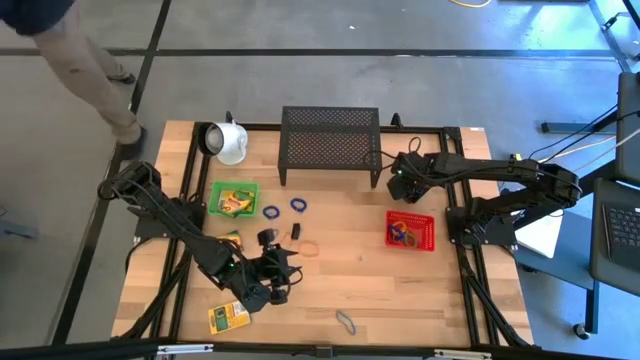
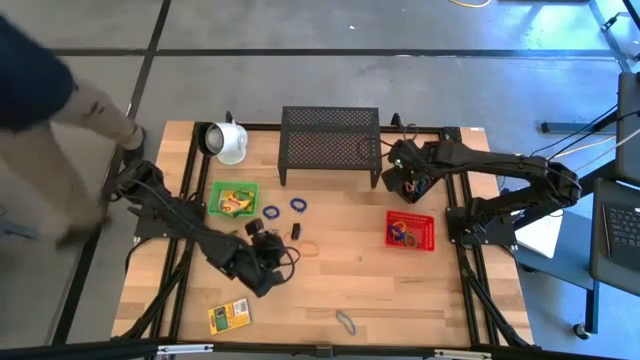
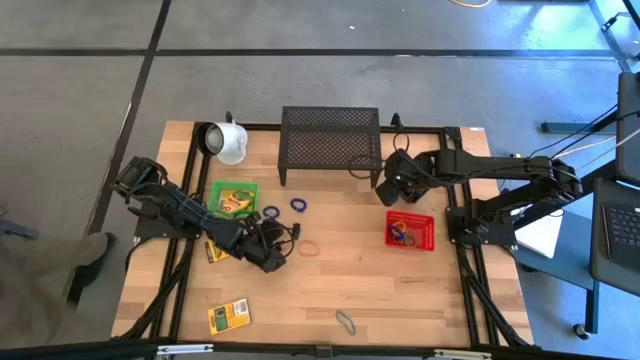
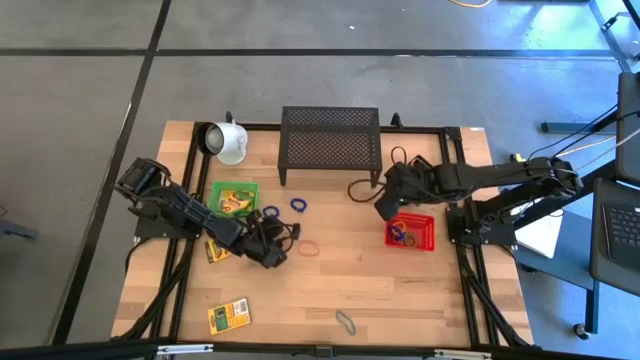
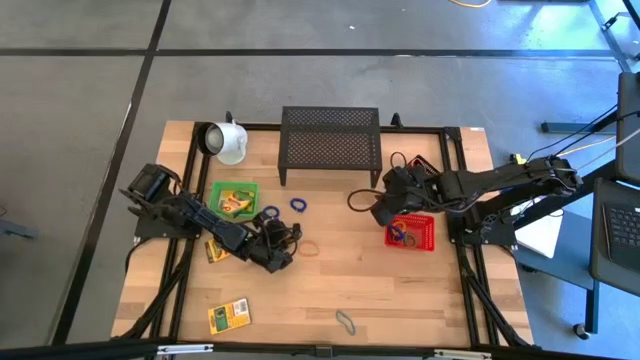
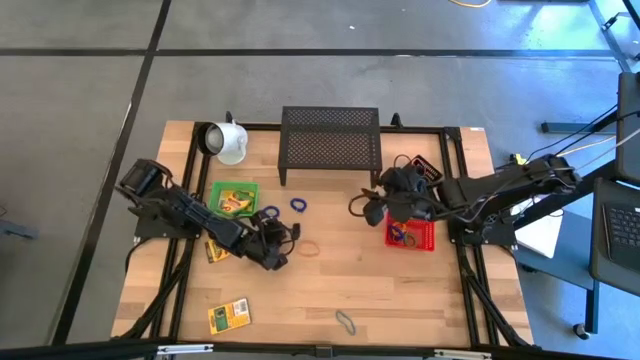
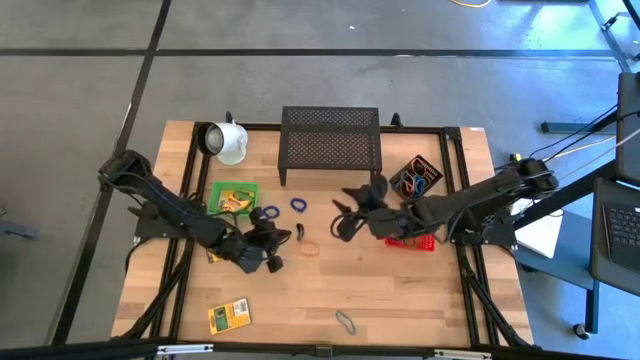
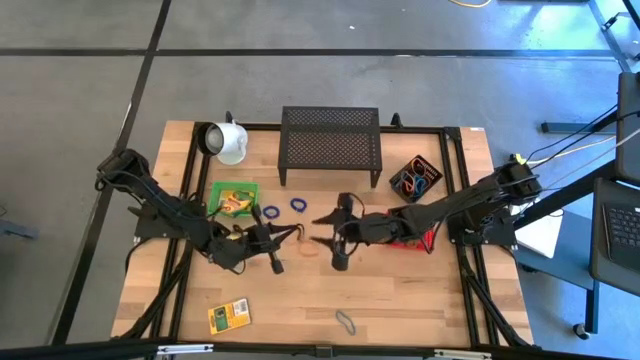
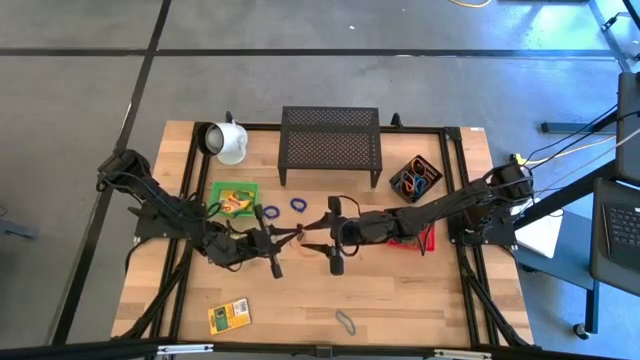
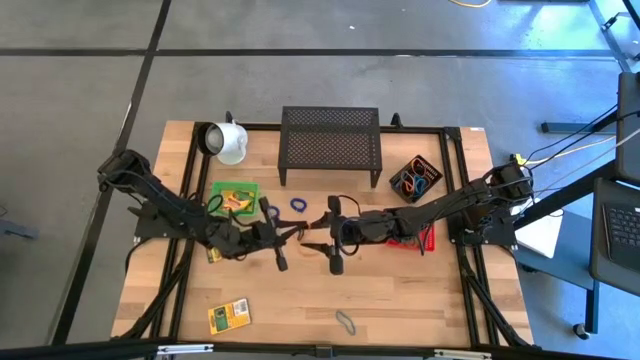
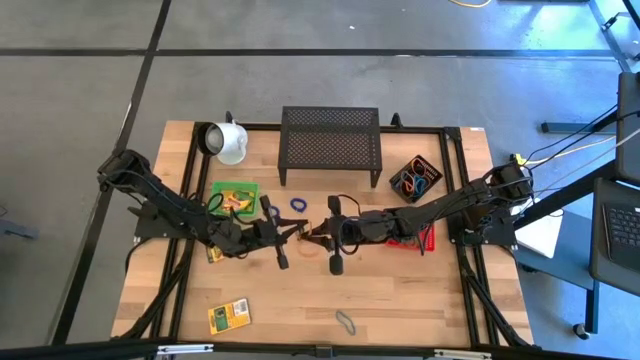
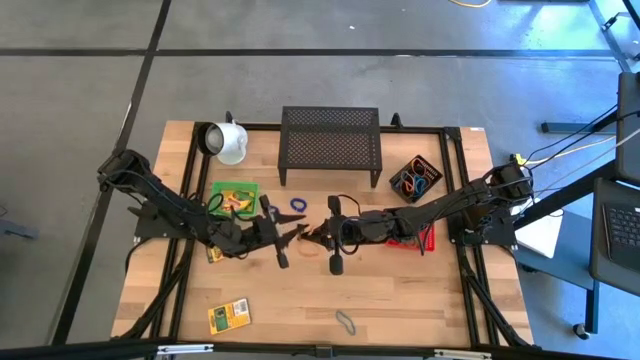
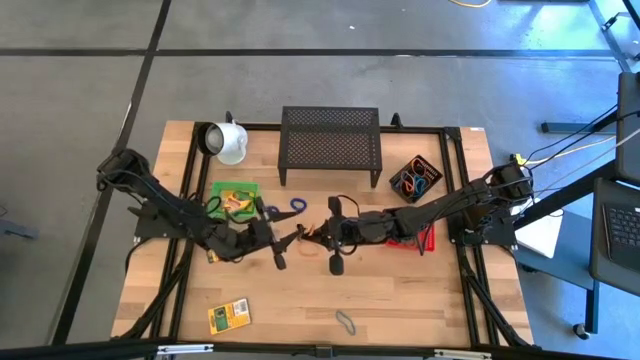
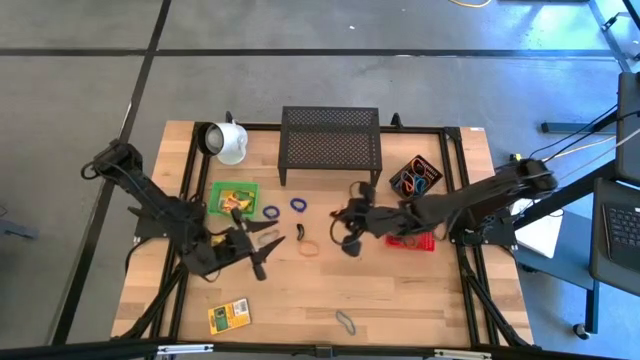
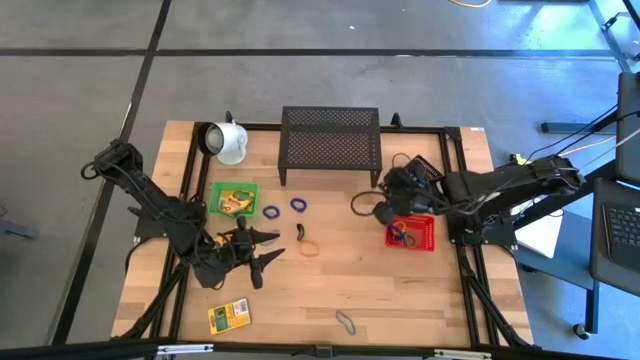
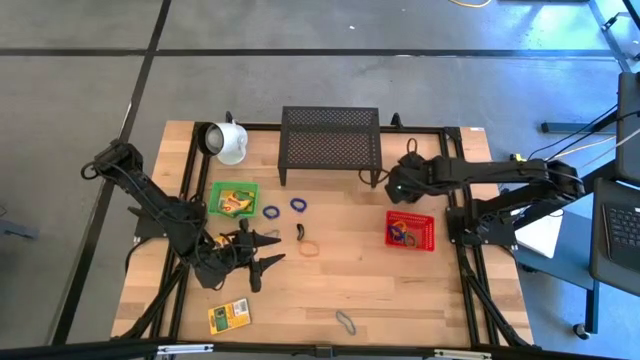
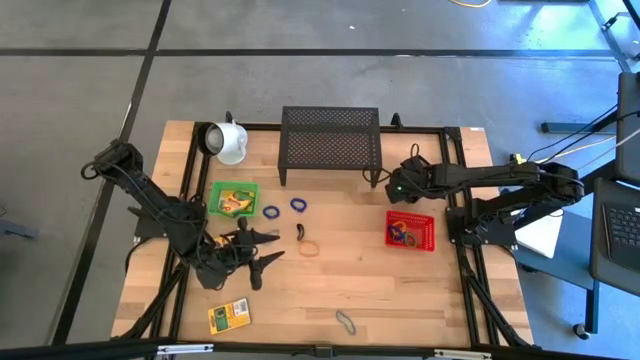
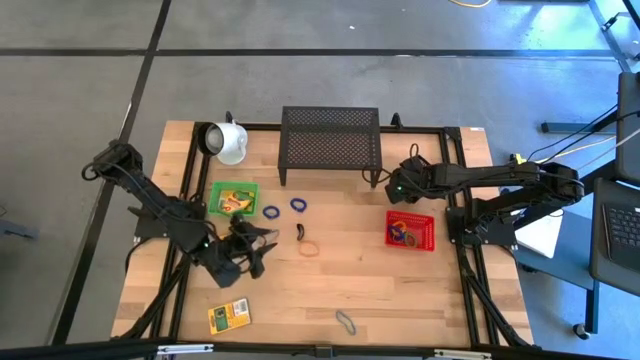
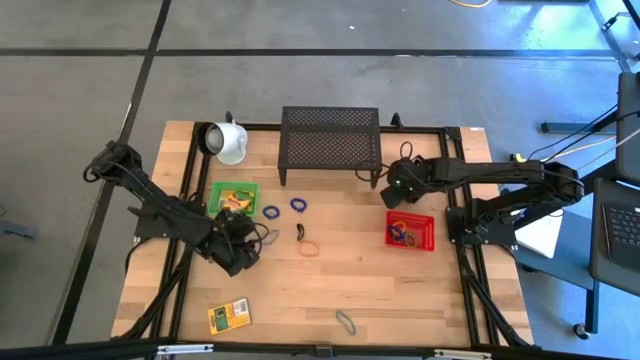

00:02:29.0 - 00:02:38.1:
Task: Pick & Place Office Desk Supplies
Put the orange rubber band into the black bin

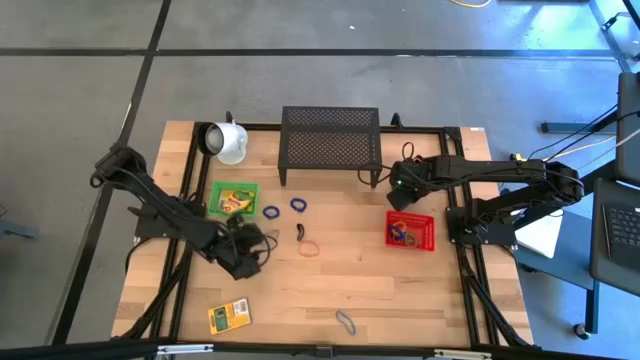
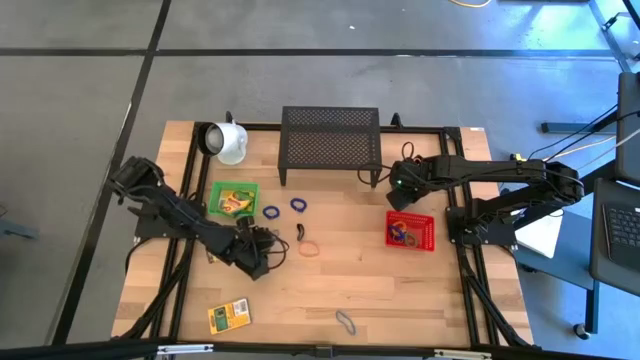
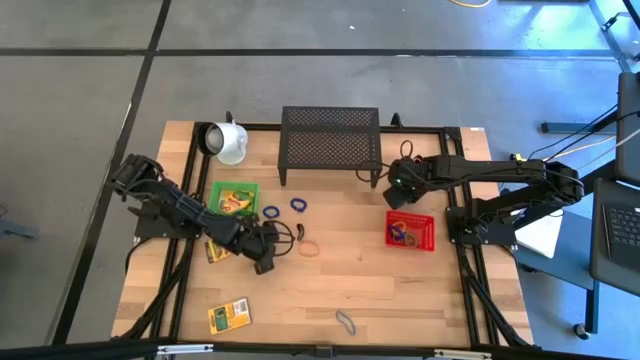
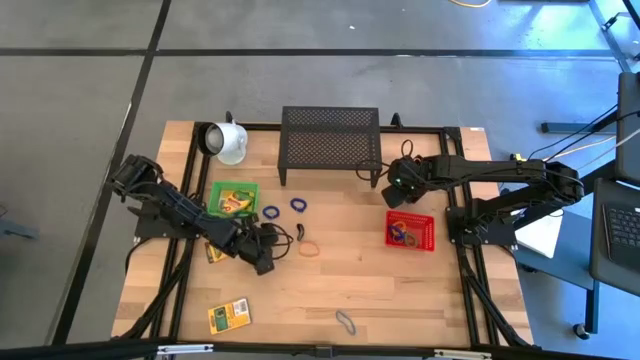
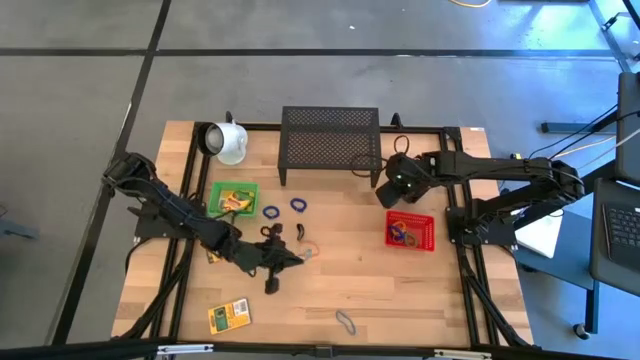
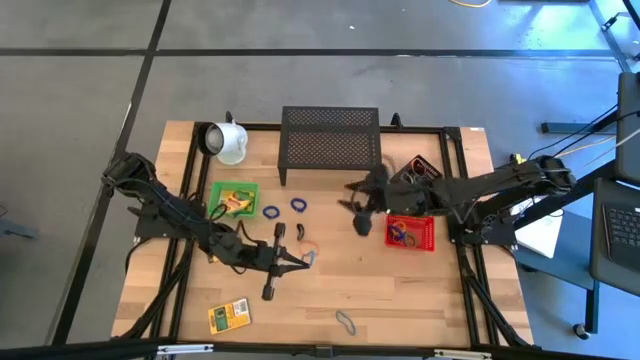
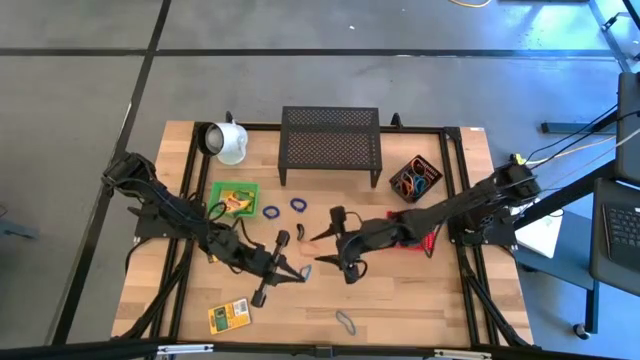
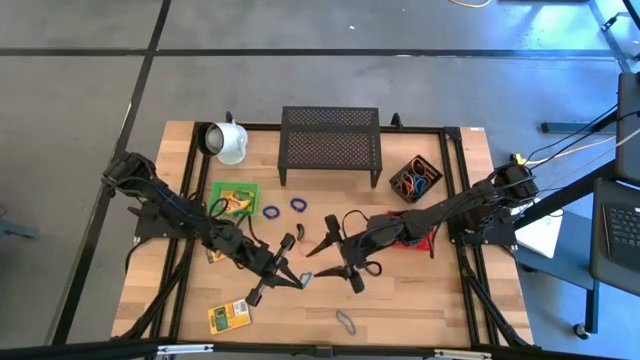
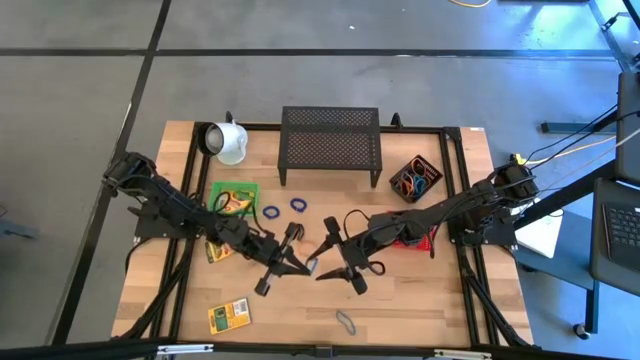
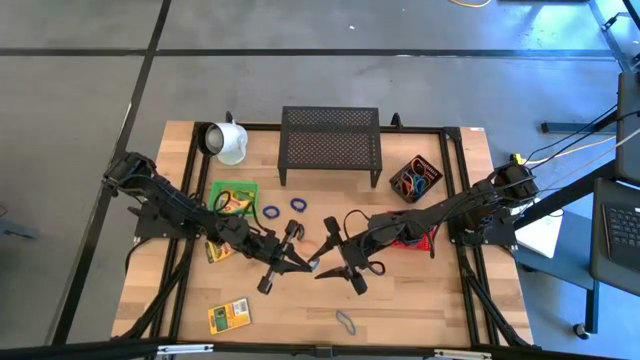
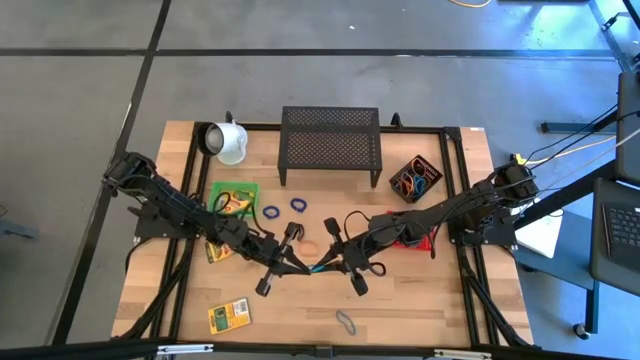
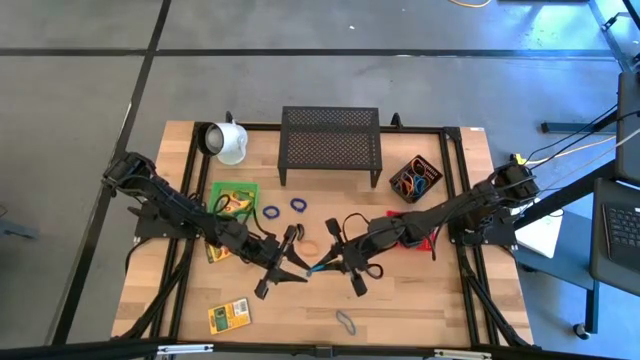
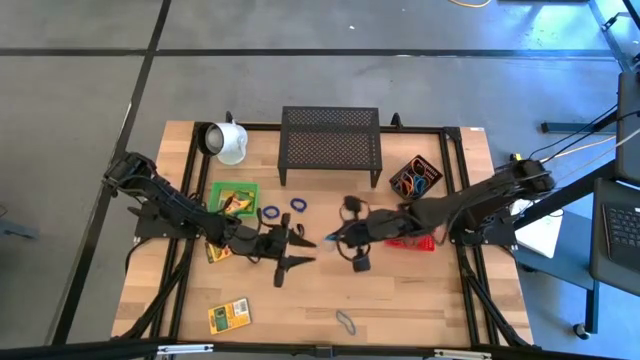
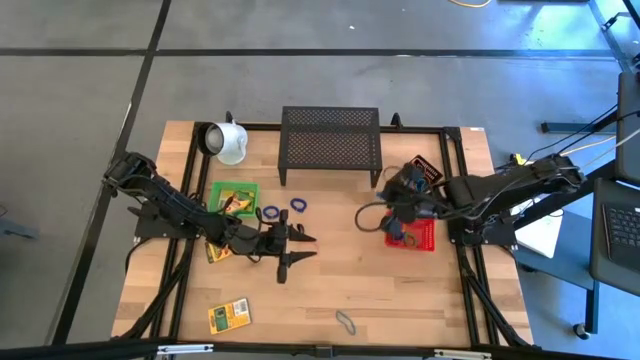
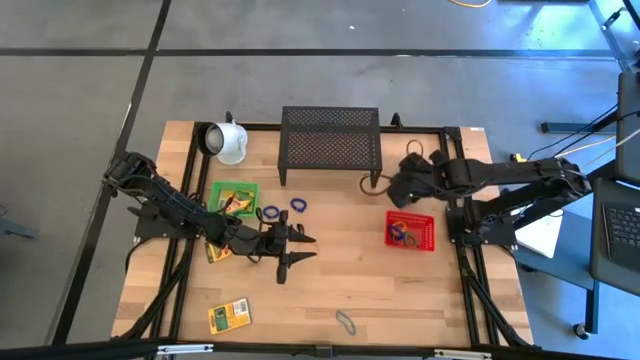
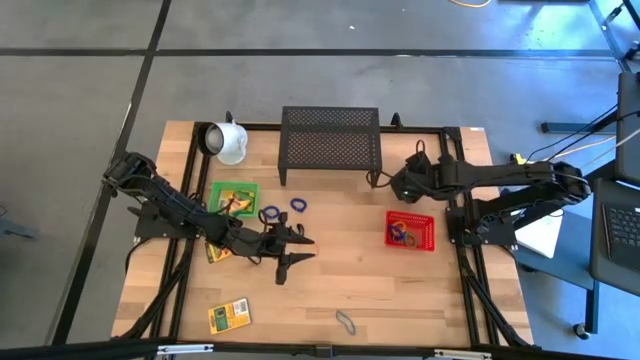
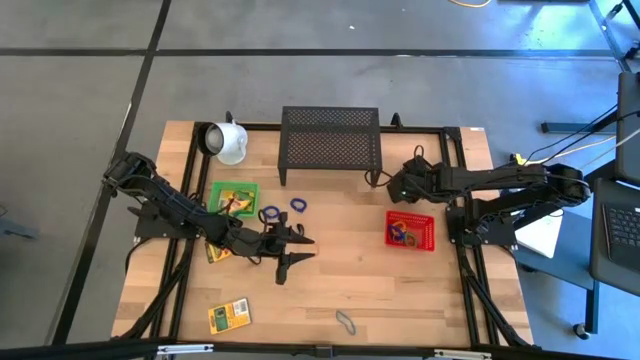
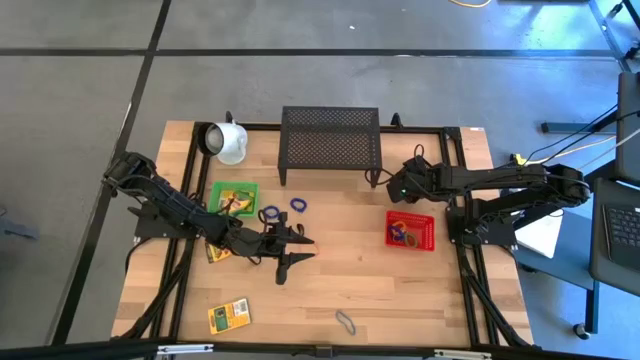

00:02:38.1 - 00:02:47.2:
Put the blue rubber band into the black bin
